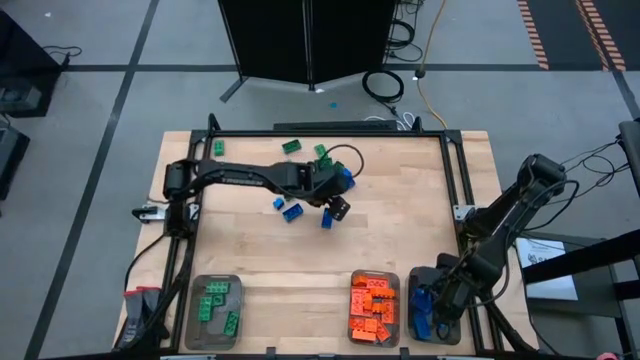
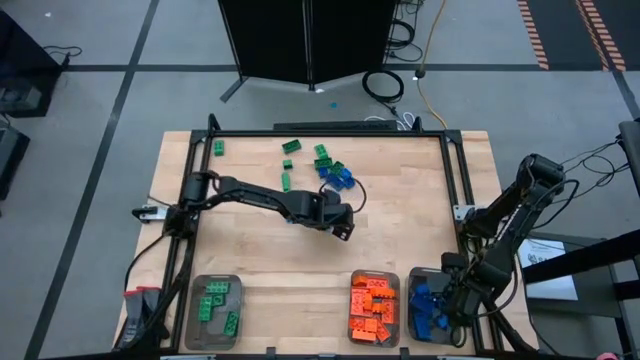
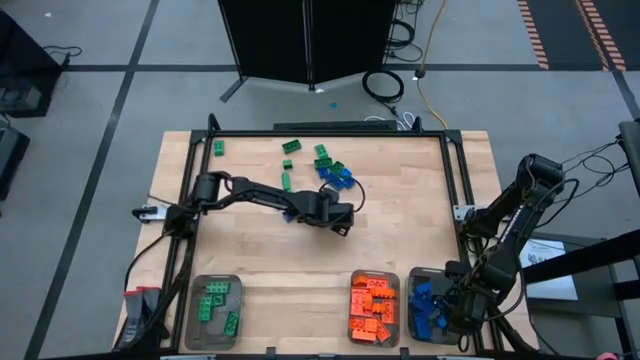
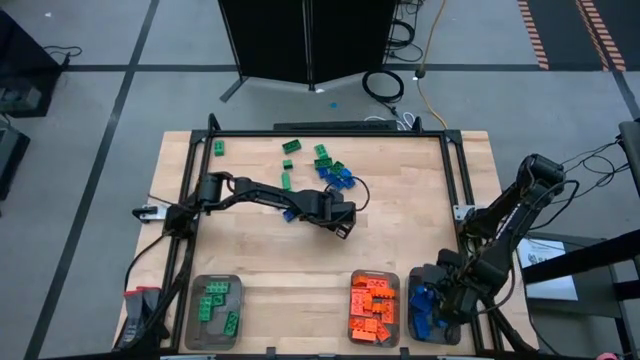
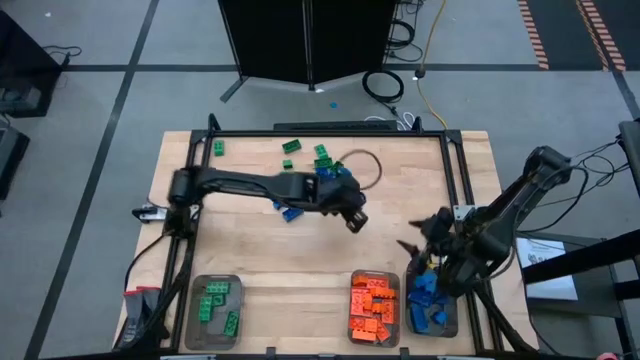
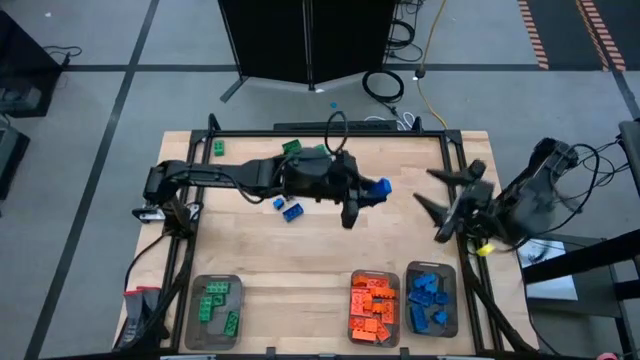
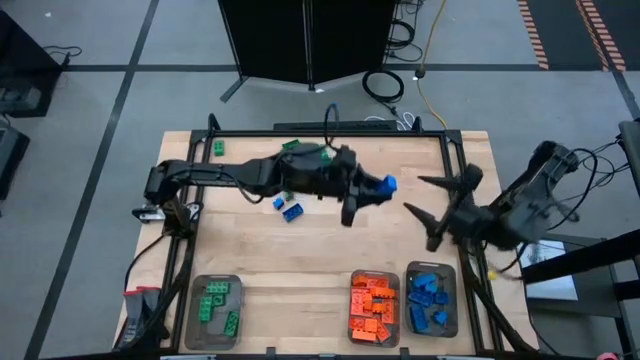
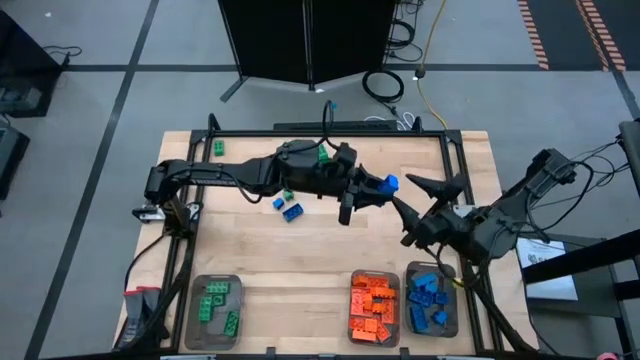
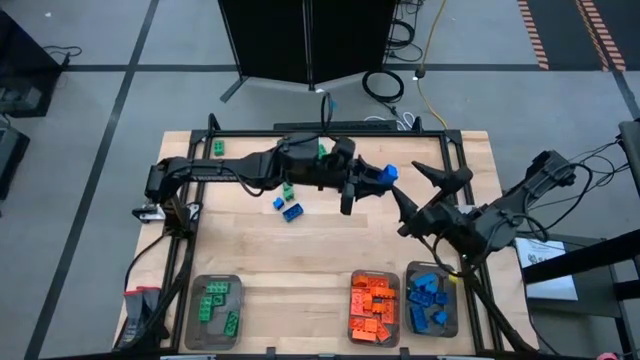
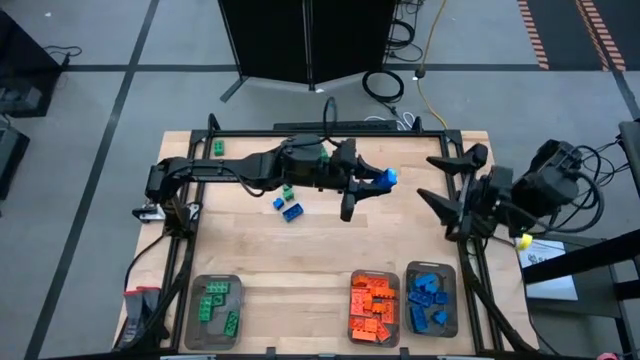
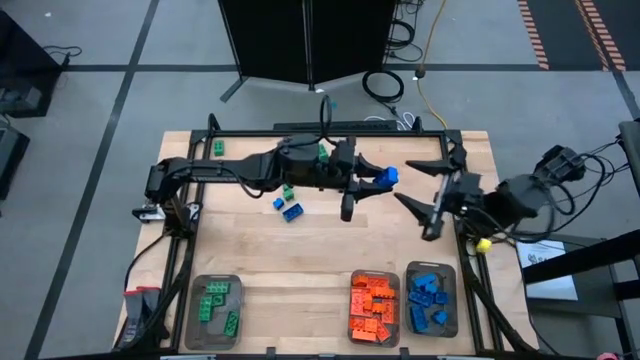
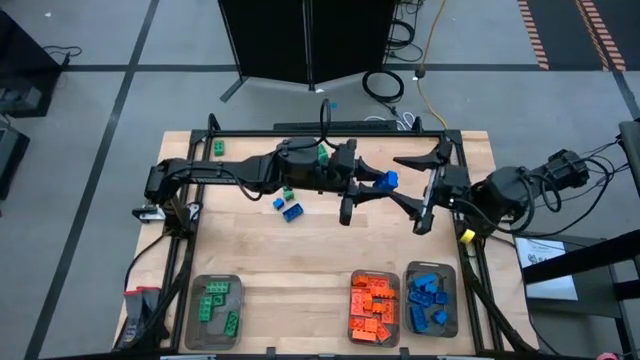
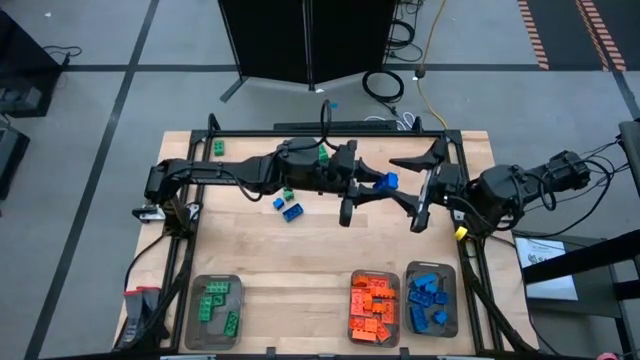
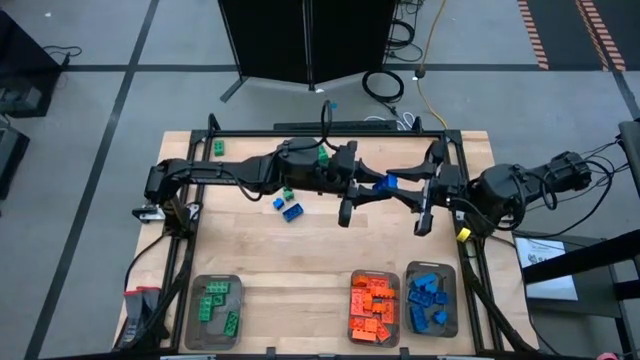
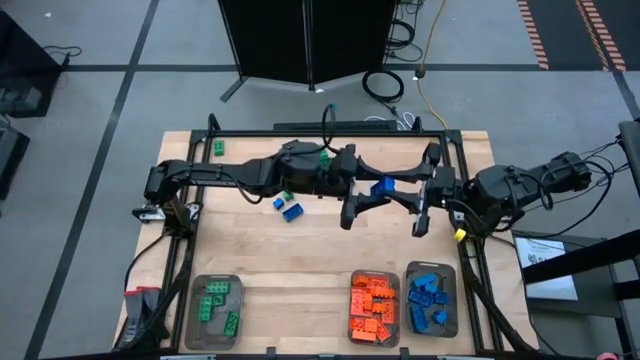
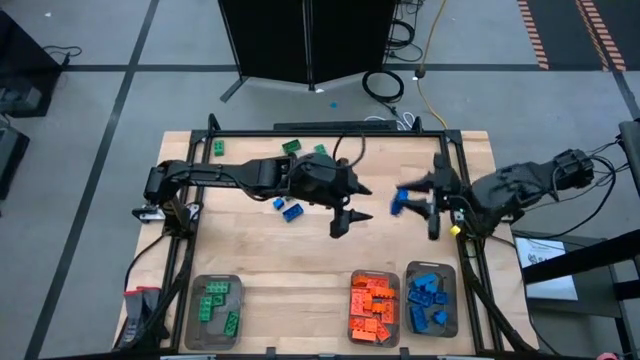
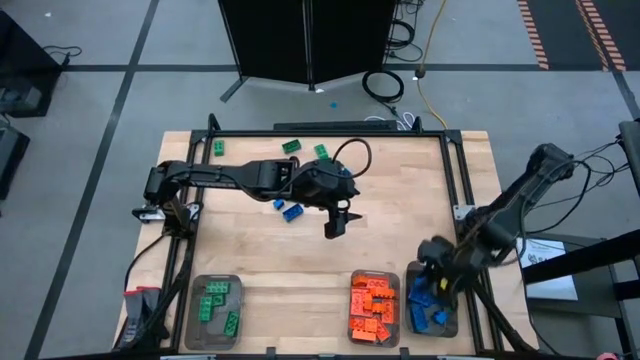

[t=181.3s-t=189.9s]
Task: Sort blocks
Put the blue game piece into the right black bin

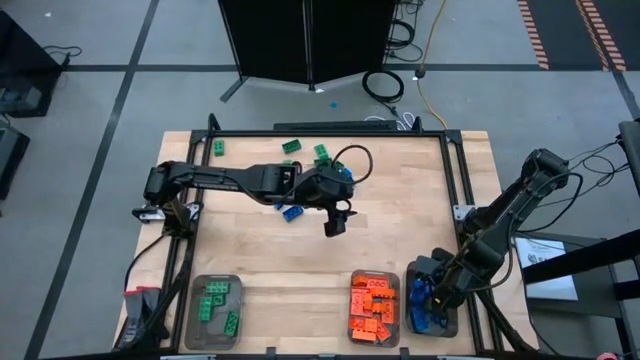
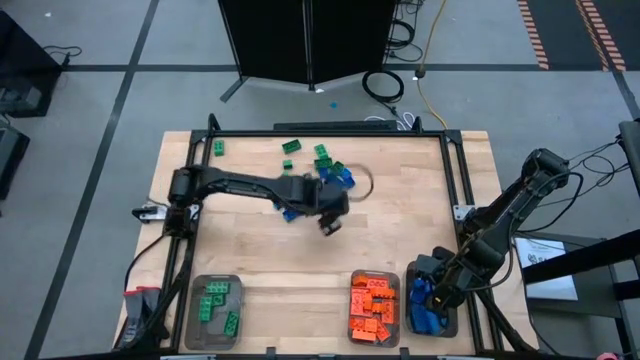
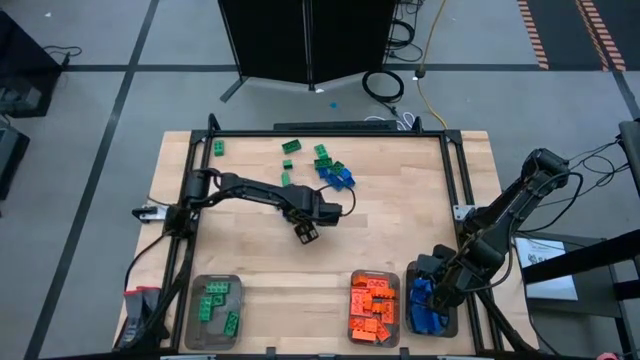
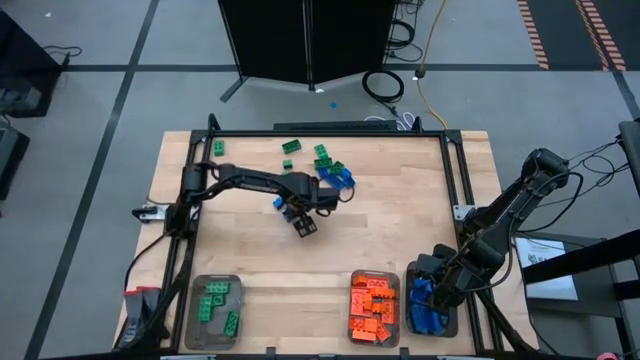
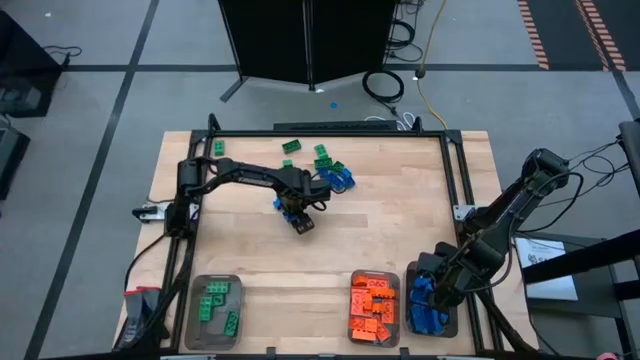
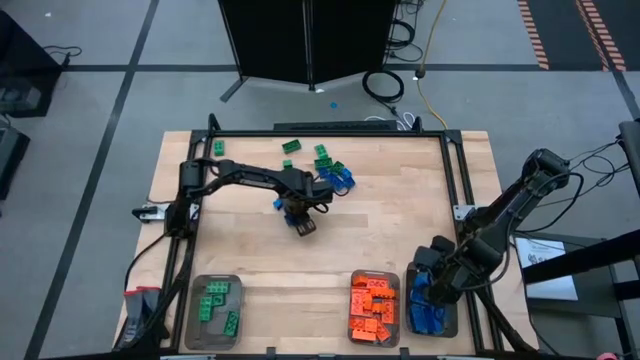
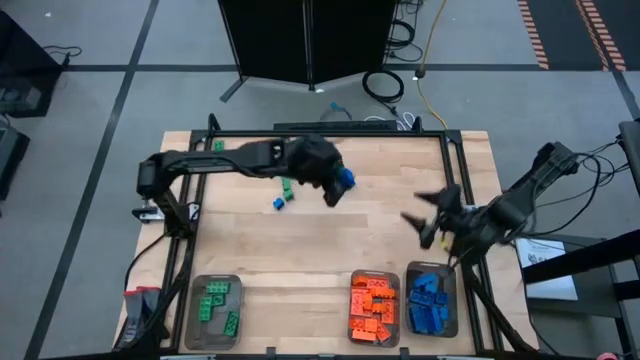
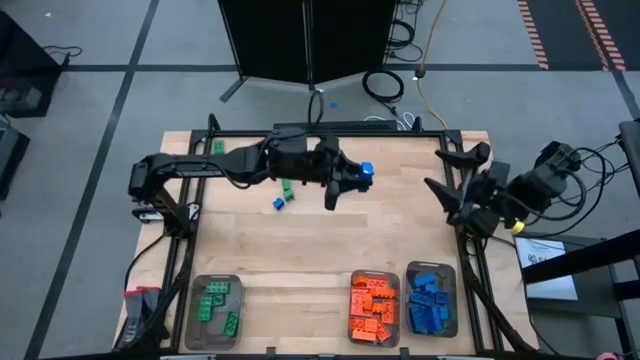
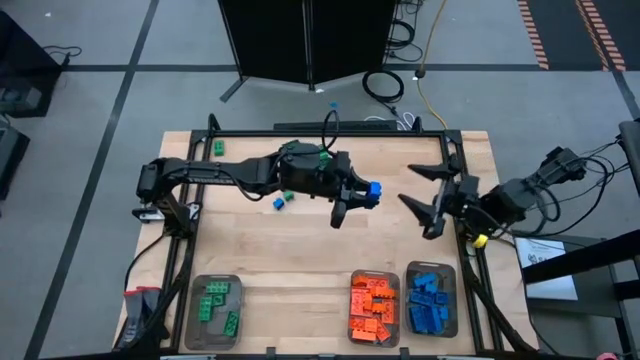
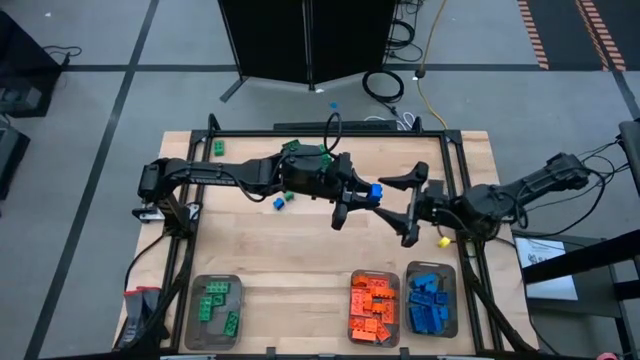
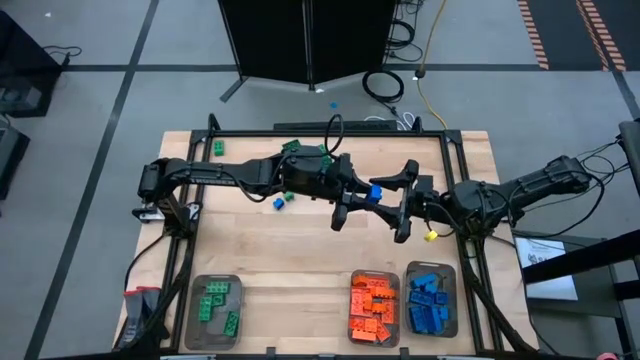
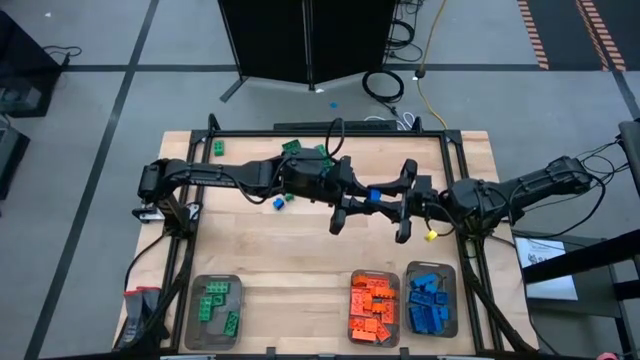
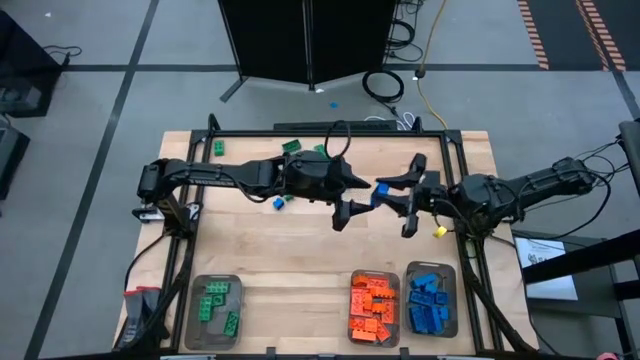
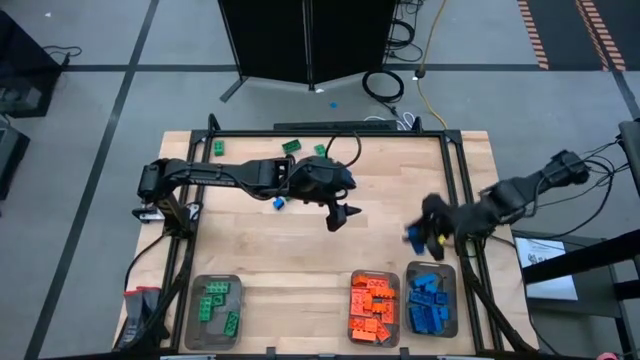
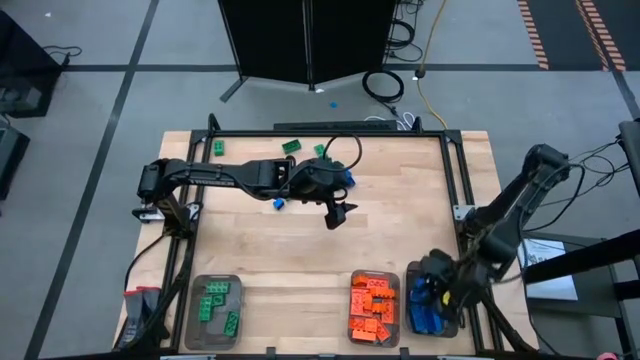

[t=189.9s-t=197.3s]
Put the blue game piece into the right black bin

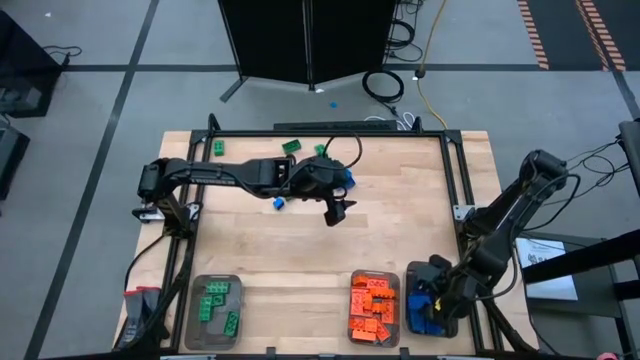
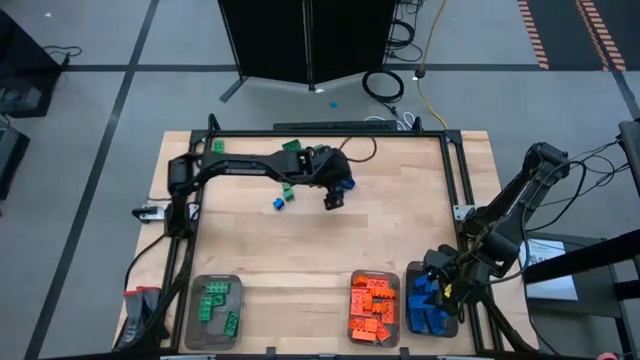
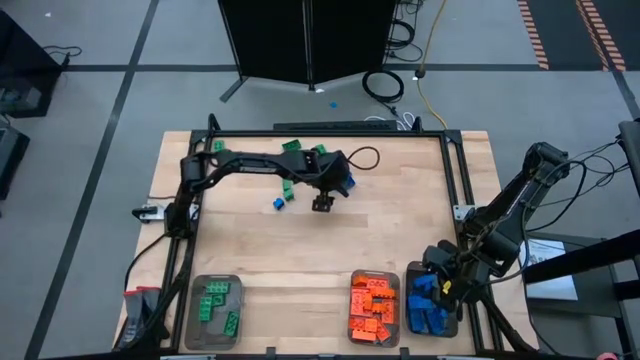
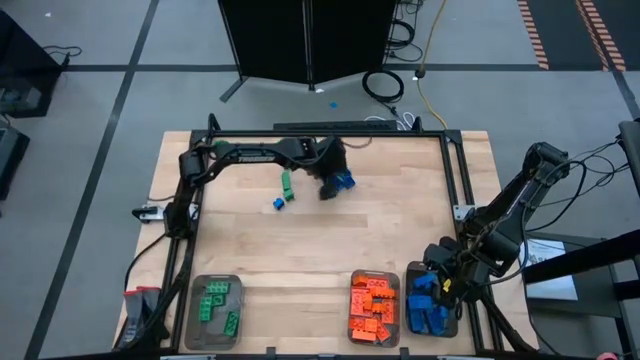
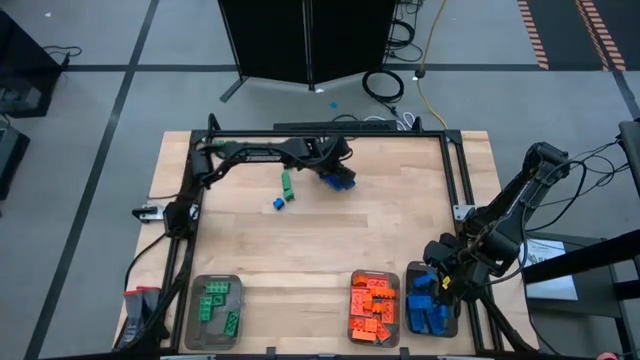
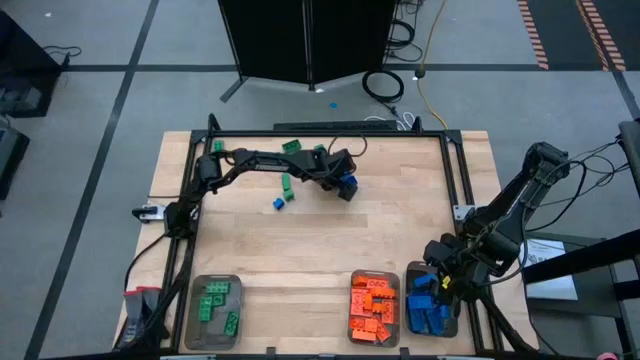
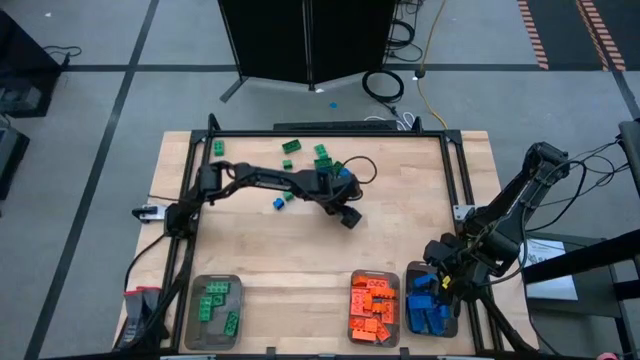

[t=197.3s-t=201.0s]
Put the blue game piece into the right black bin
